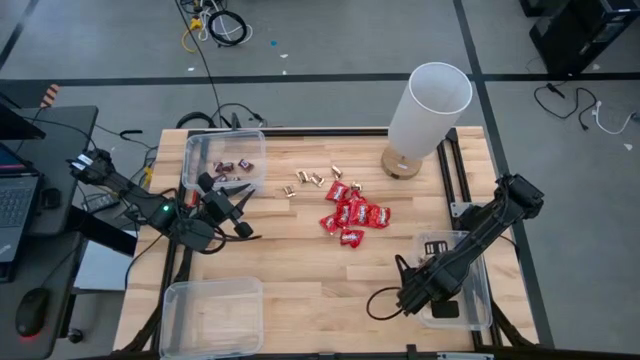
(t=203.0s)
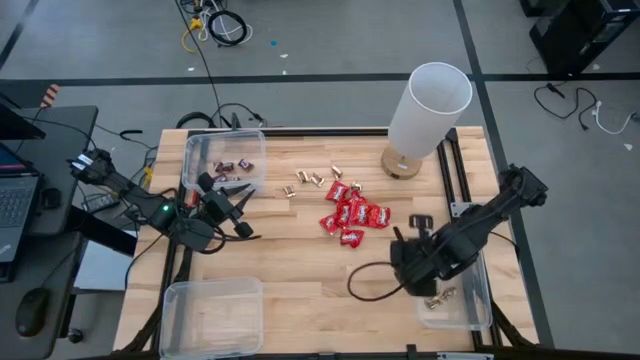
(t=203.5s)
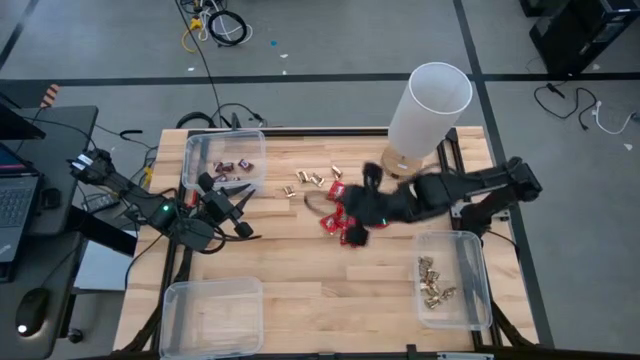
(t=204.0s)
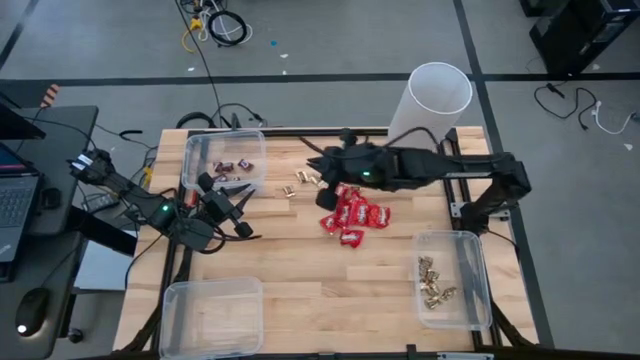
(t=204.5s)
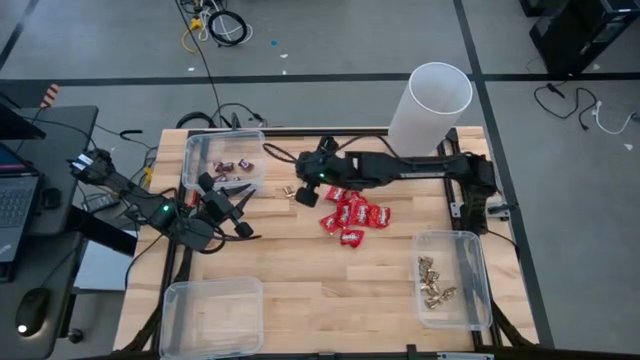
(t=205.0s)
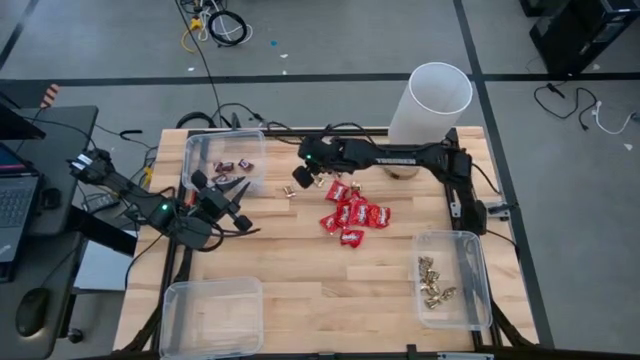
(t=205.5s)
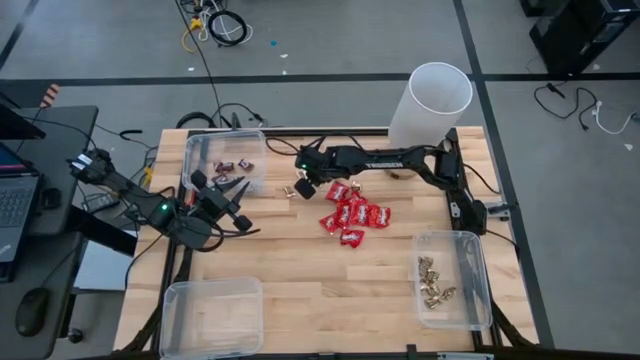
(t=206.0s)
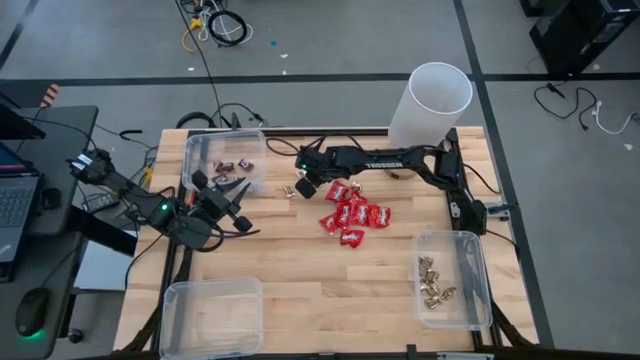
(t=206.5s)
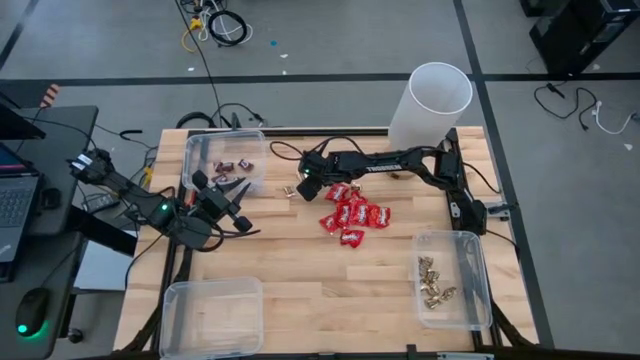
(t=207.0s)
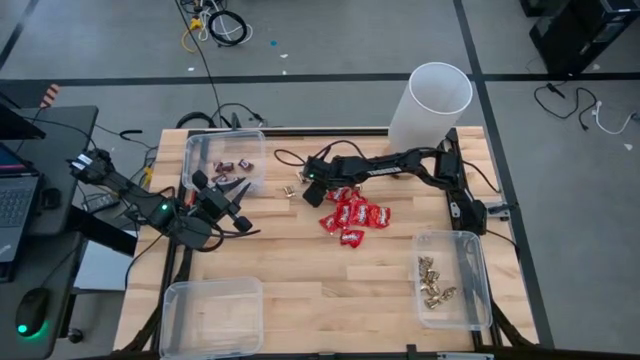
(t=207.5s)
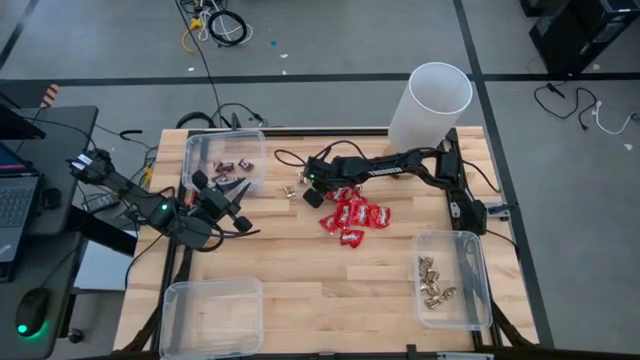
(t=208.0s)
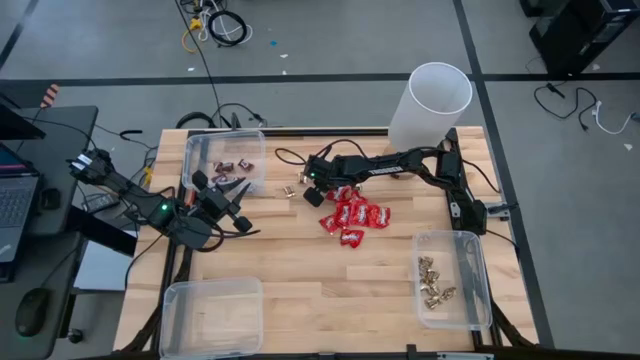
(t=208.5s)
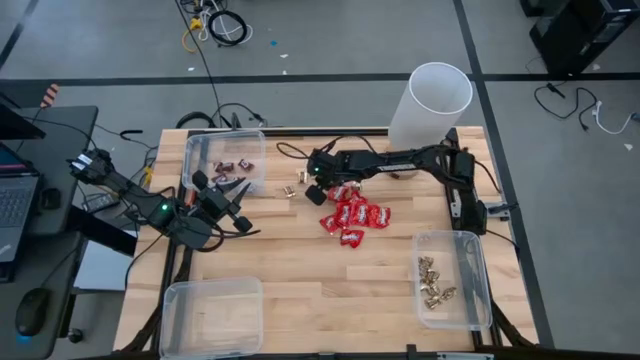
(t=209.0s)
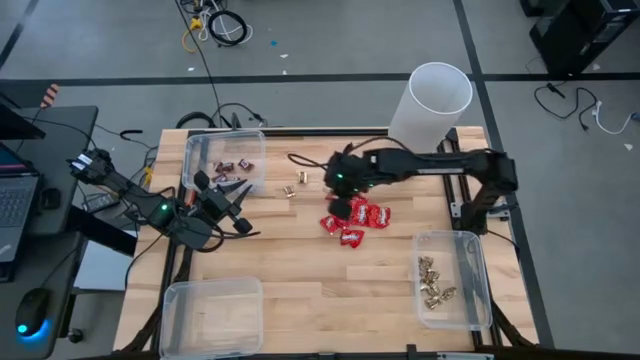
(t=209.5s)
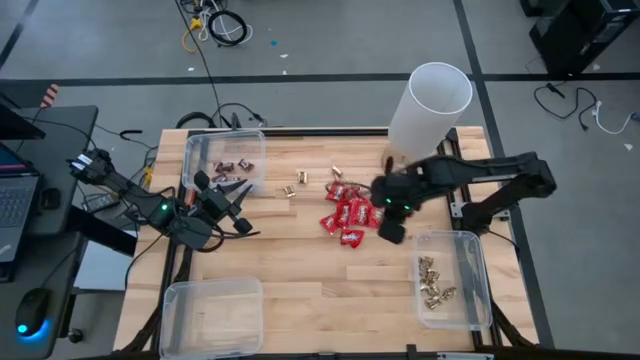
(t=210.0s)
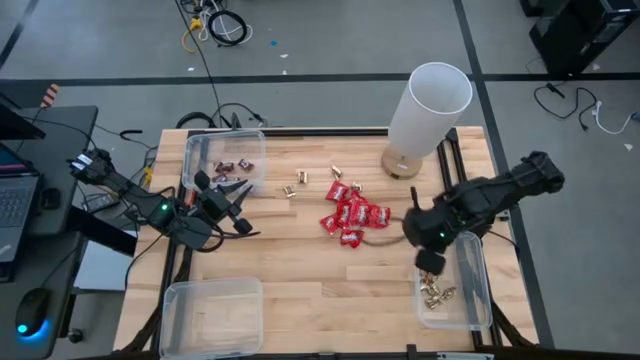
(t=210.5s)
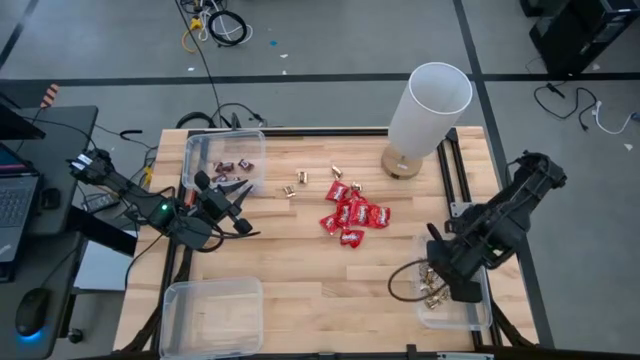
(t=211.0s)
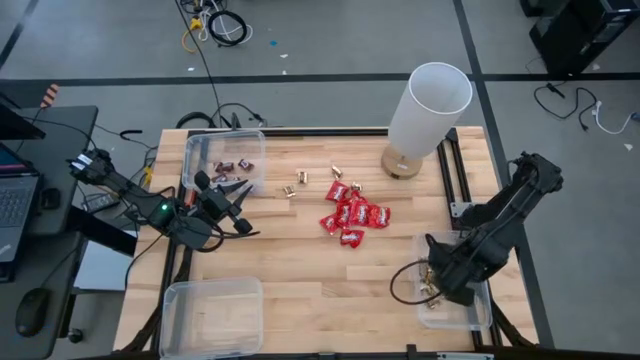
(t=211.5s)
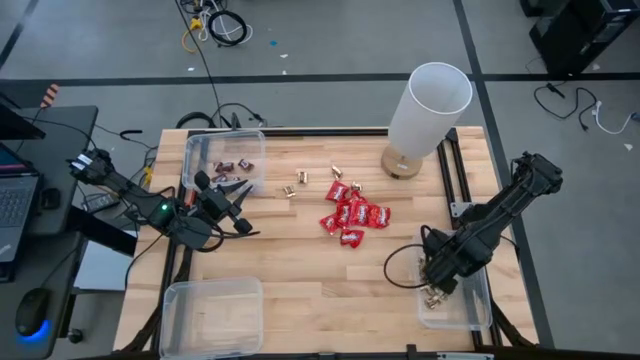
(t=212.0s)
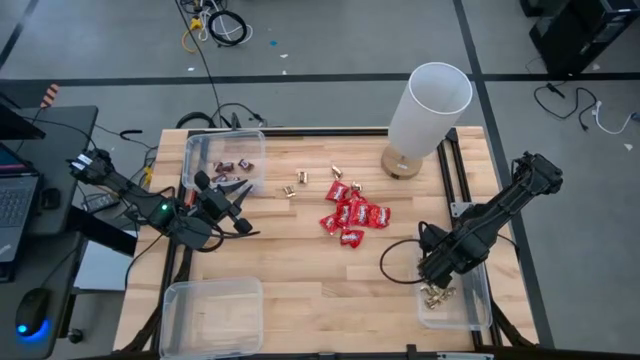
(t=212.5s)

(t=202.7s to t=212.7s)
Task: Sort candy
Put the gold chocolate into the bottom right transparent bin

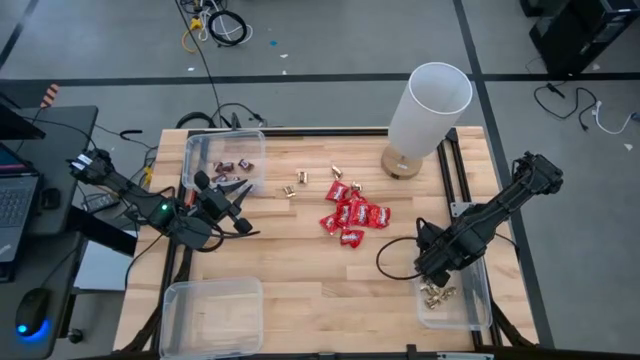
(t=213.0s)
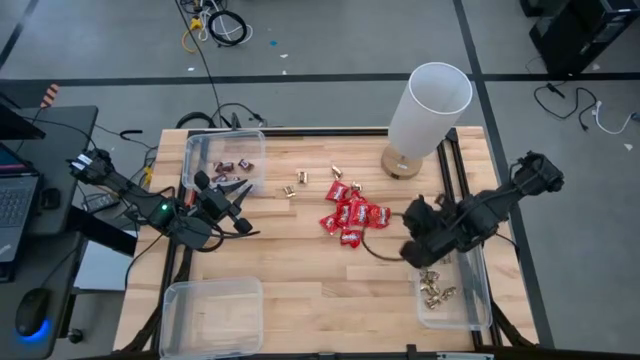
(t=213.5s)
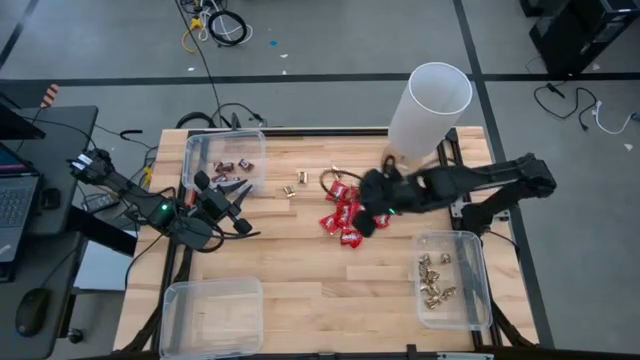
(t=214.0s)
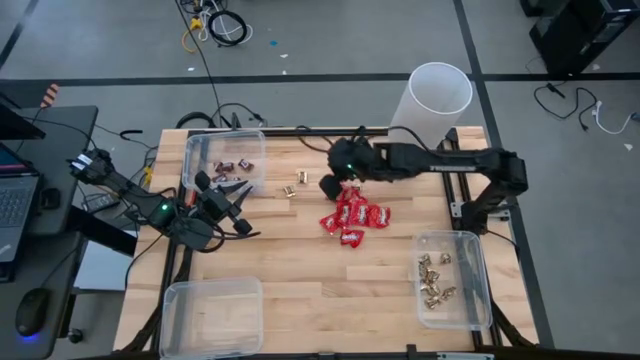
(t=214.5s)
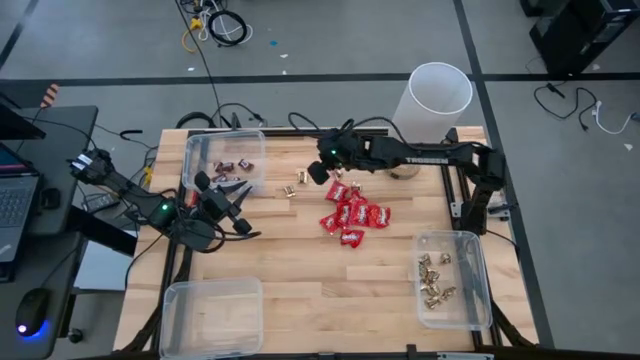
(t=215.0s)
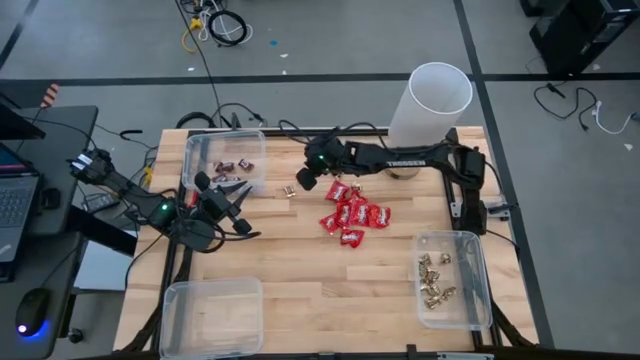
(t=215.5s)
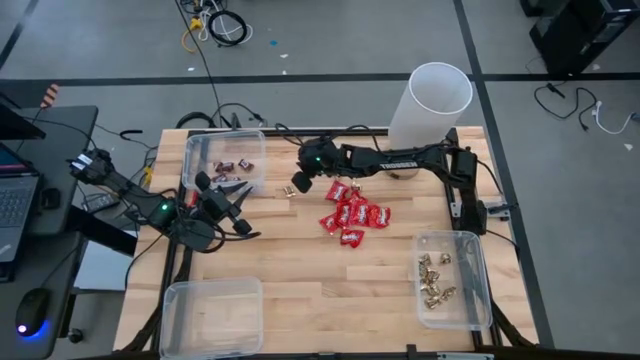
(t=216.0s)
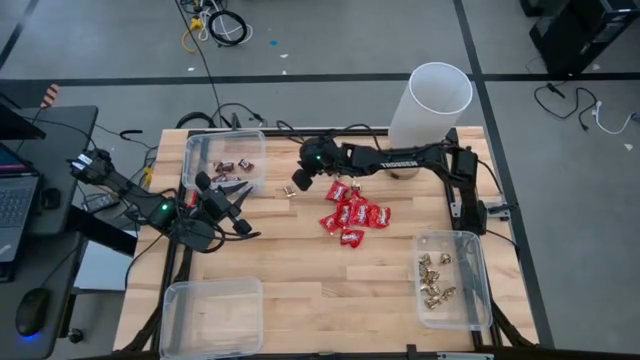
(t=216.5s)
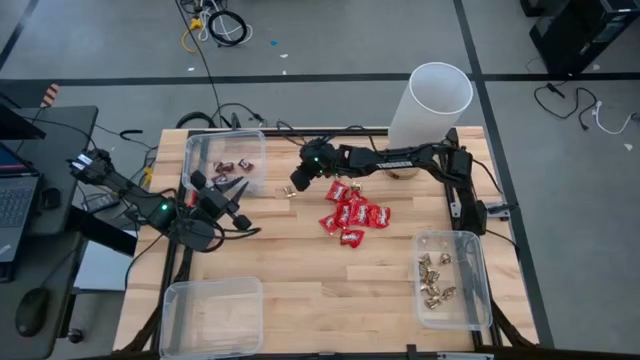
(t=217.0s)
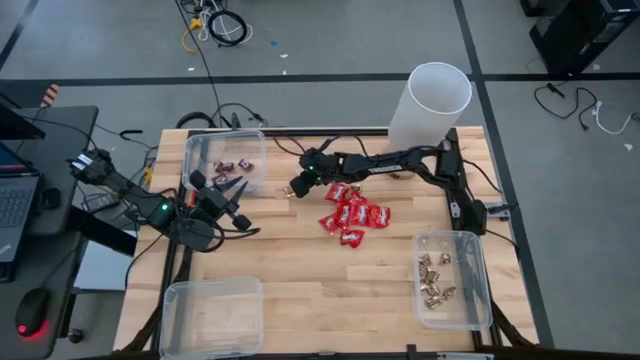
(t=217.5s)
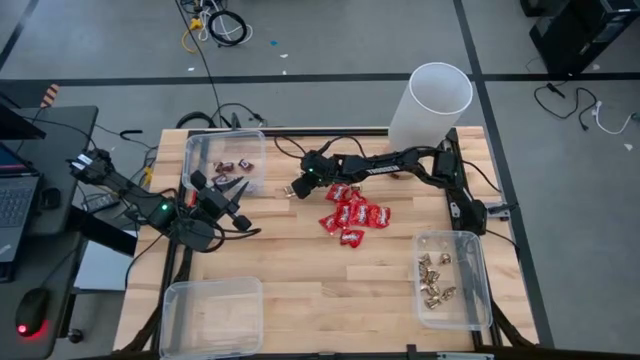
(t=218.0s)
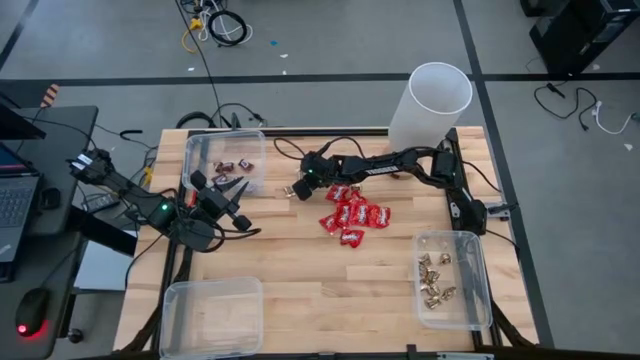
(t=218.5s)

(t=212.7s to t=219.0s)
Put the gold chocolate into the bottom right transparent bin
